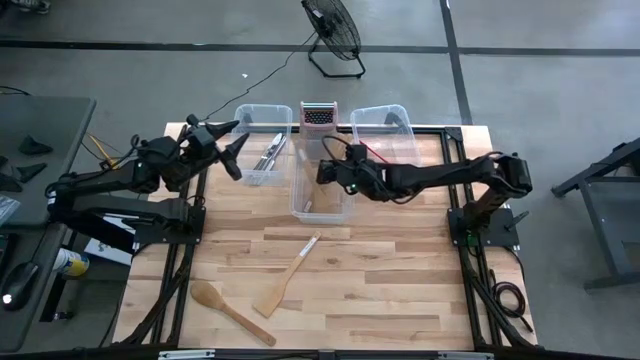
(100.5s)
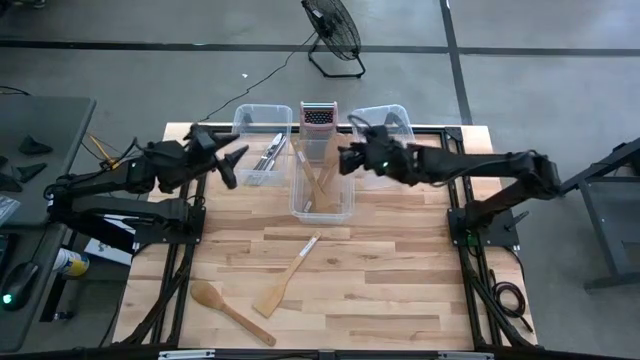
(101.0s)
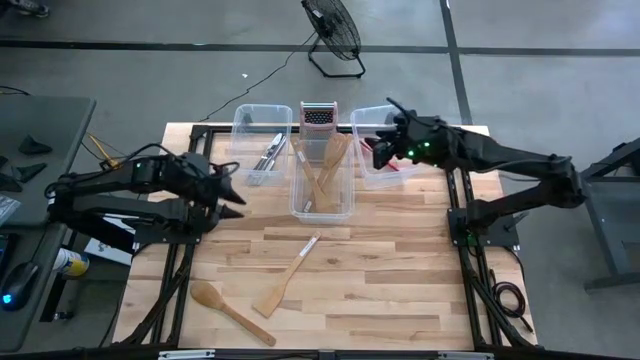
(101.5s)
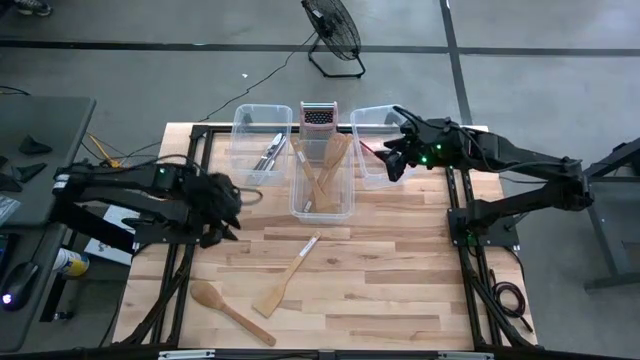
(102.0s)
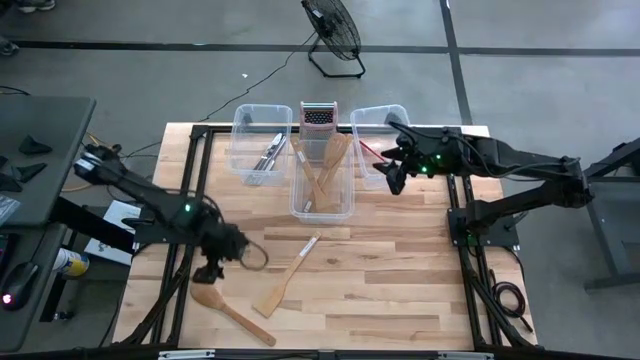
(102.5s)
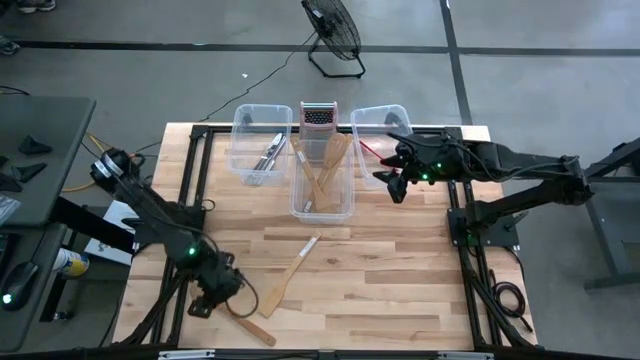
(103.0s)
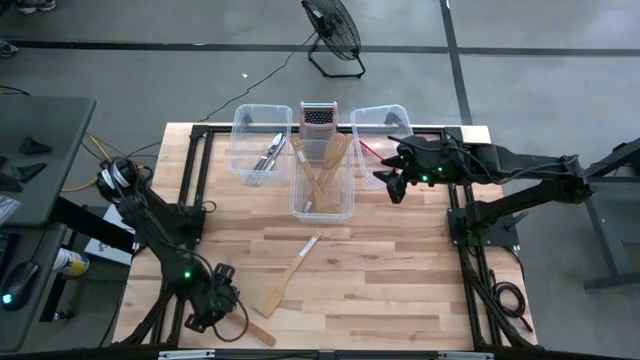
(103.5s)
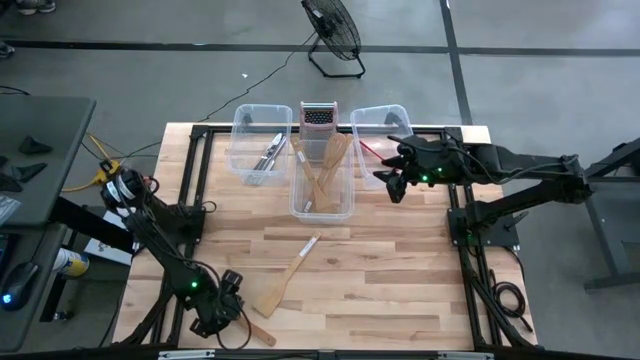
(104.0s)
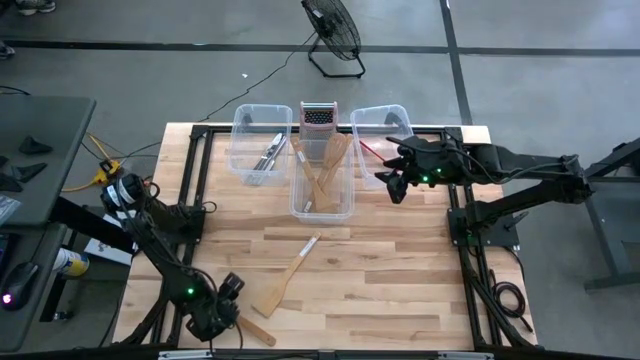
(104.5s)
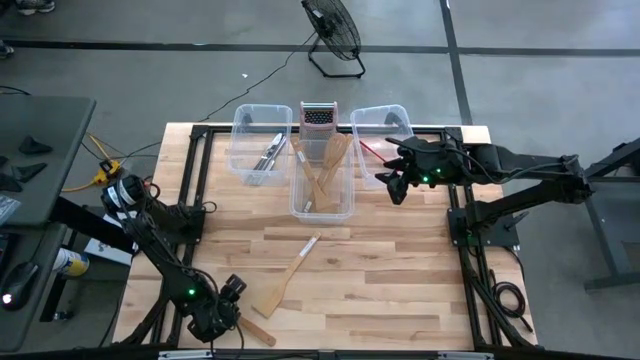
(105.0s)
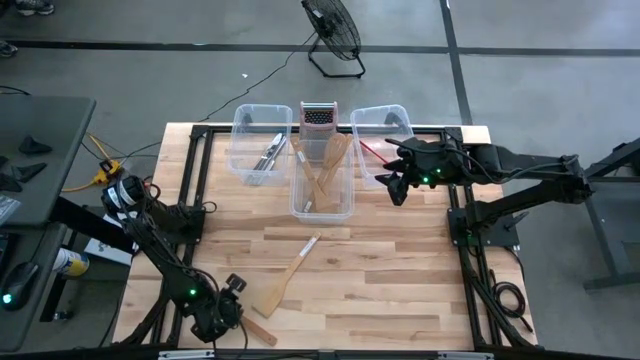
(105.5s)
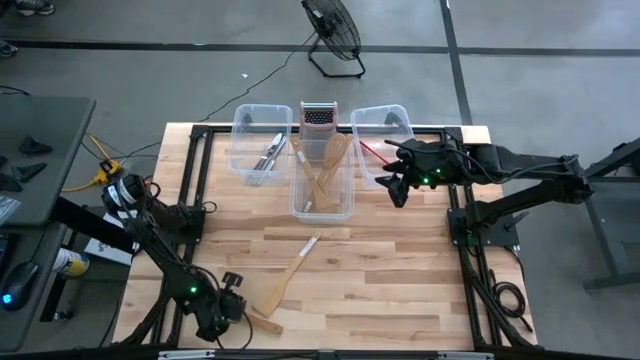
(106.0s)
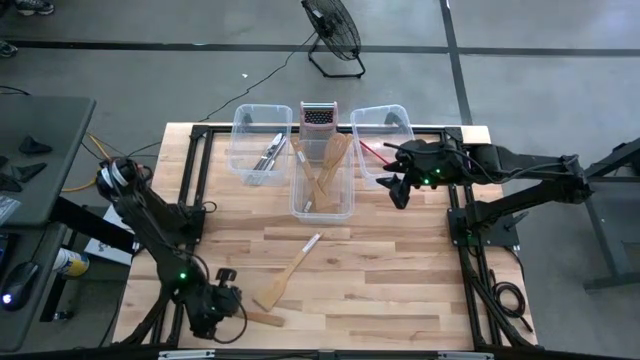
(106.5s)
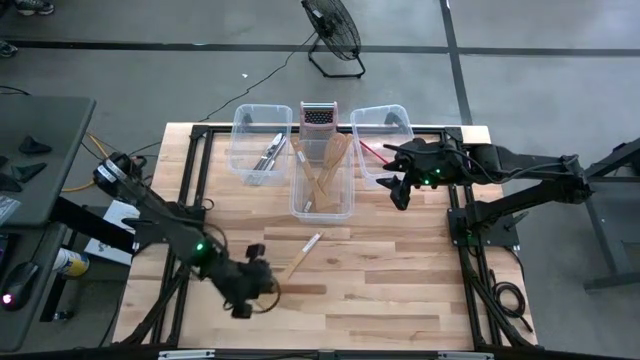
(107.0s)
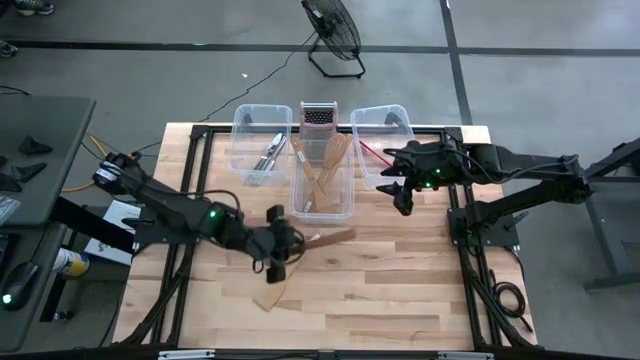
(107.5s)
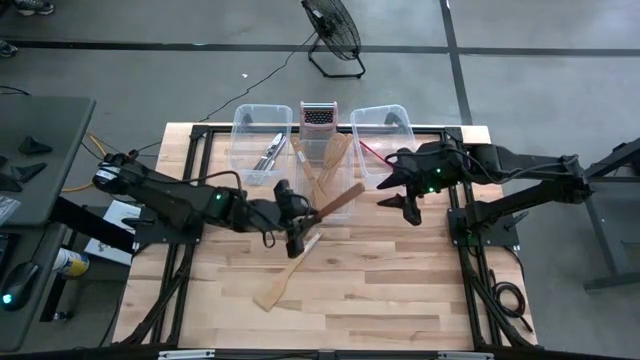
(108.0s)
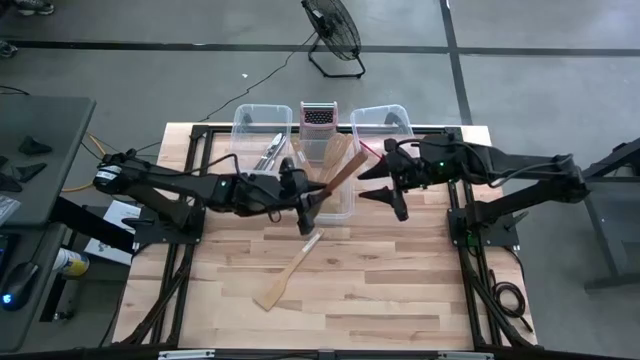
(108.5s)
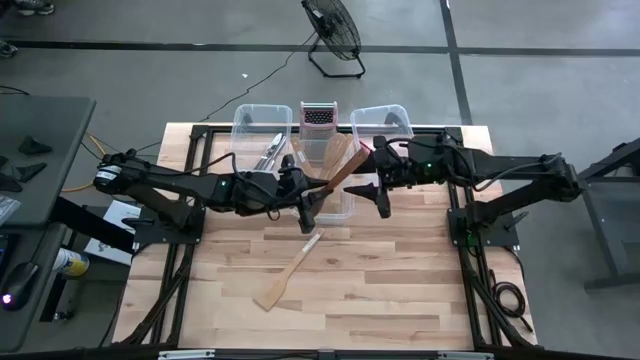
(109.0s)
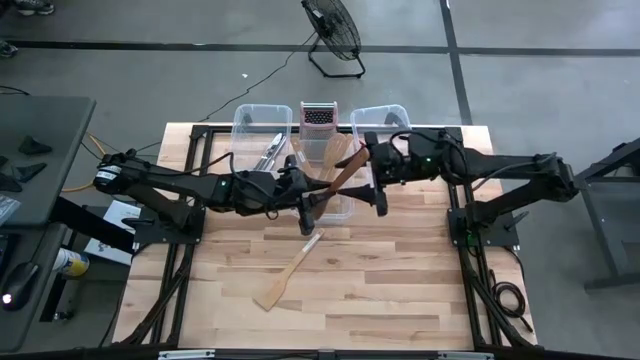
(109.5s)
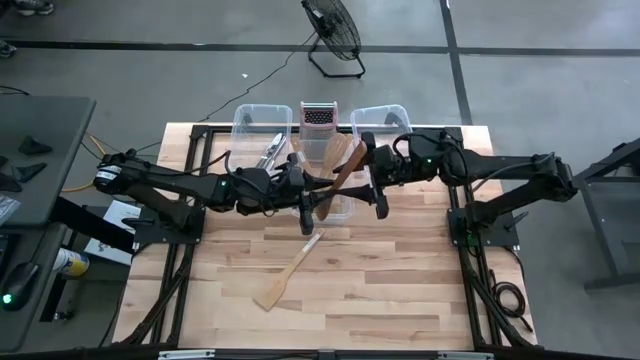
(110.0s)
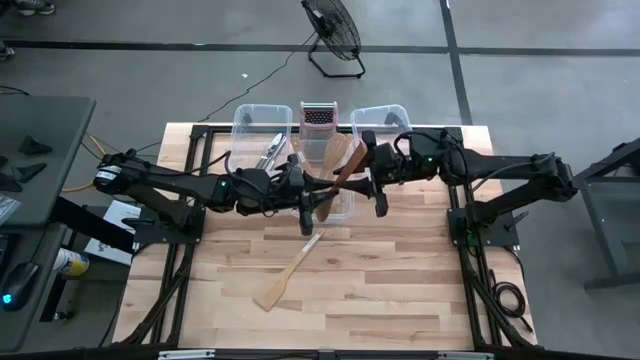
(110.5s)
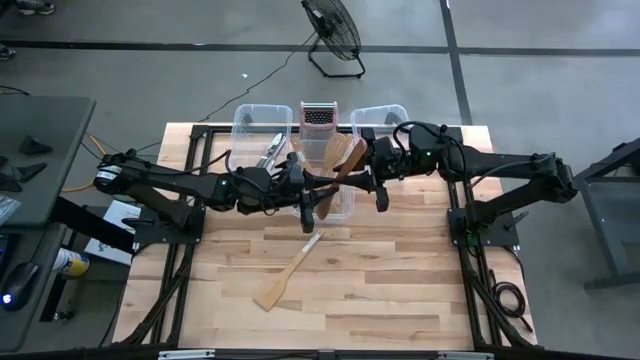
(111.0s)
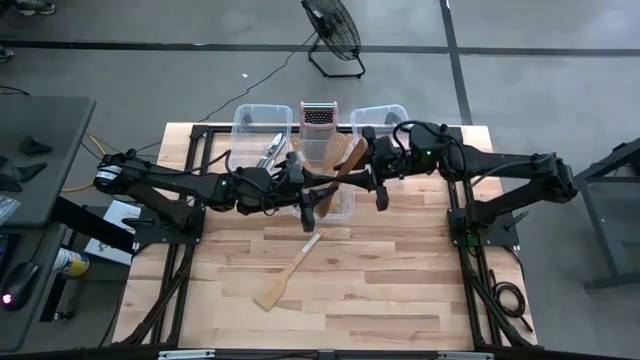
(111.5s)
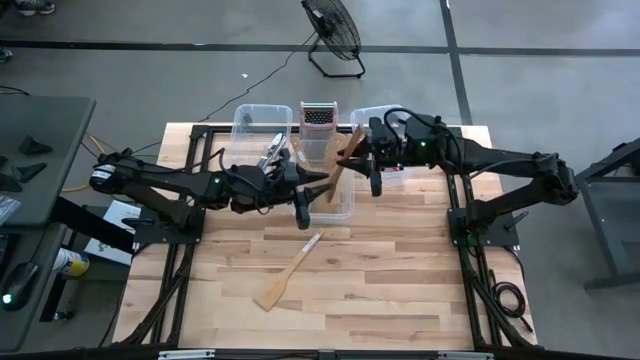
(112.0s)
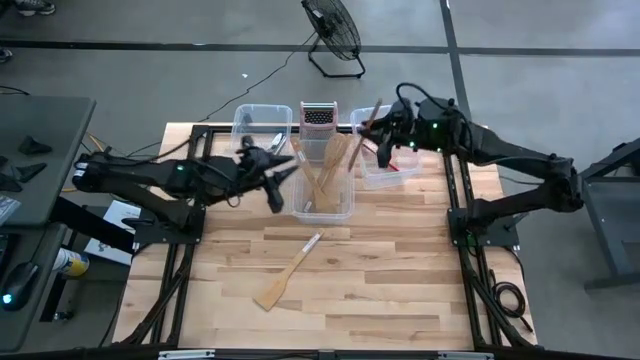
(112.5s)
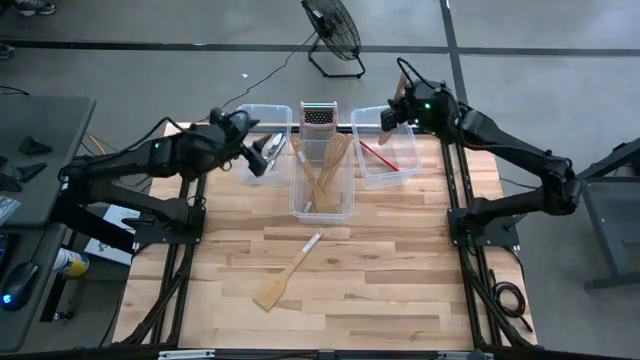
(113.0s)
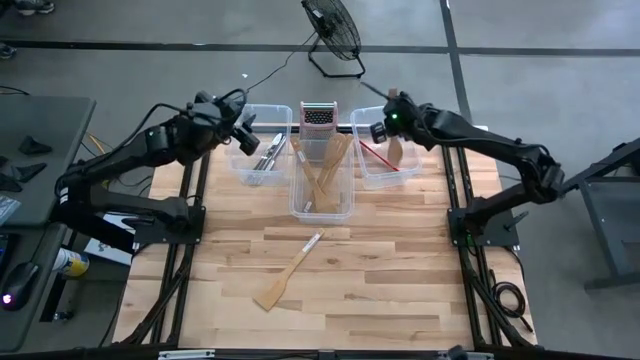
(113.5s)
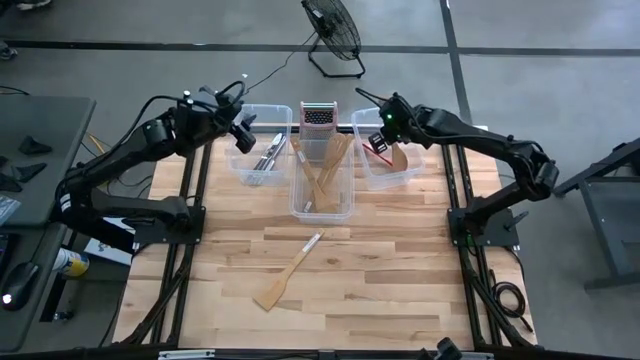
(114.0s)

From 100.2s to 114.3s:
Task: Pick & Place Kitchen Items
Put the brown serving spoon into the right transparent bin

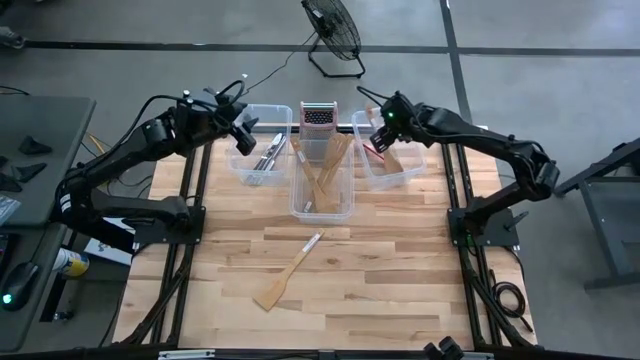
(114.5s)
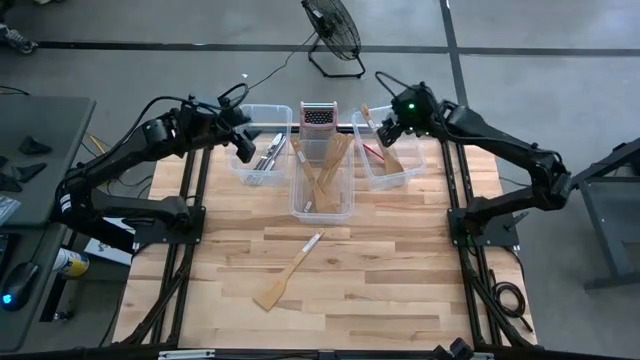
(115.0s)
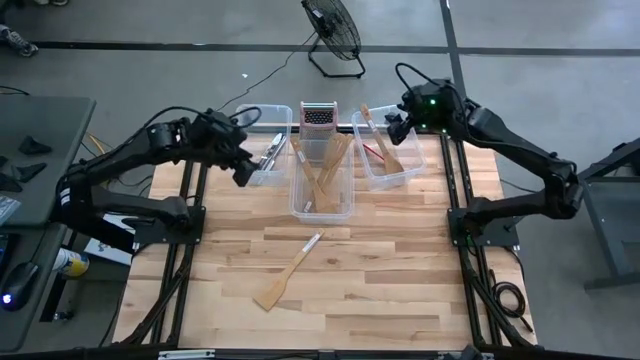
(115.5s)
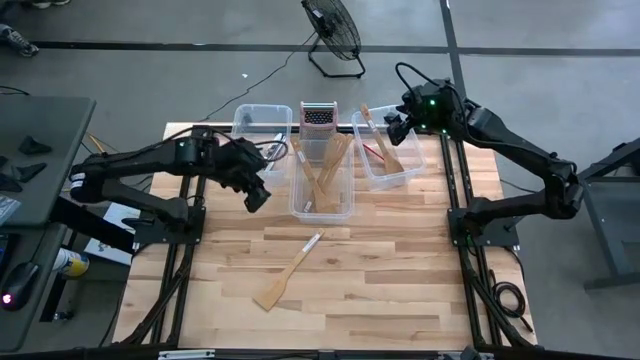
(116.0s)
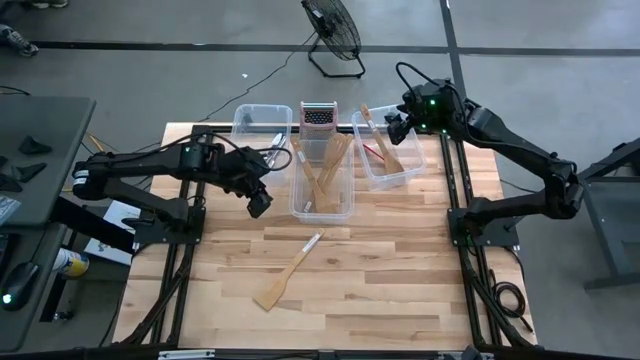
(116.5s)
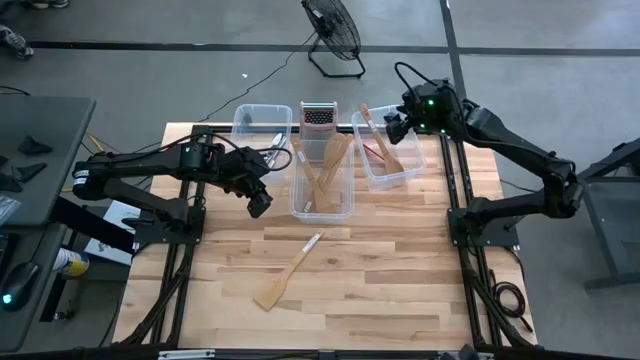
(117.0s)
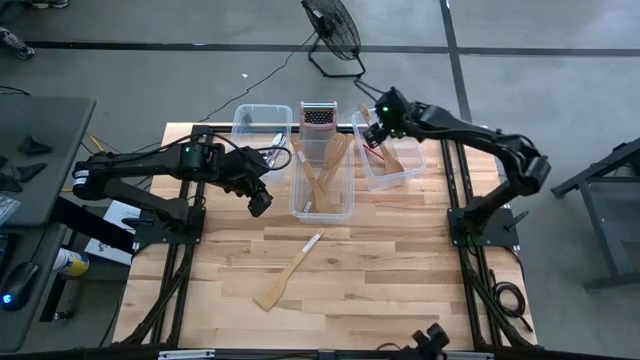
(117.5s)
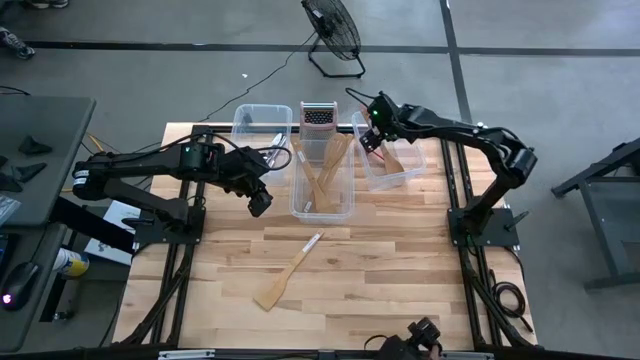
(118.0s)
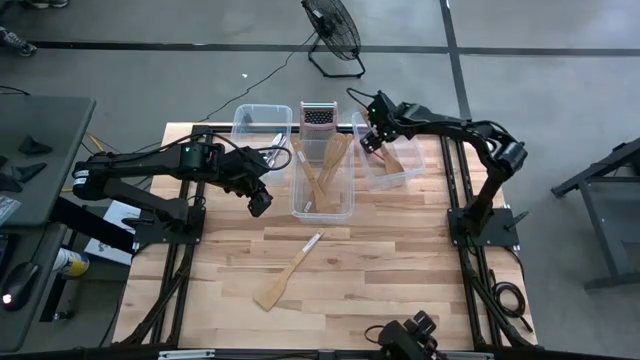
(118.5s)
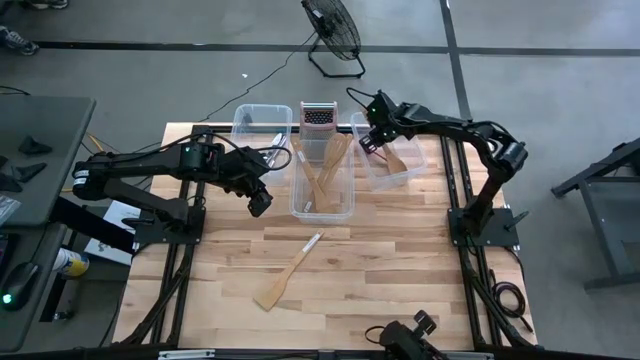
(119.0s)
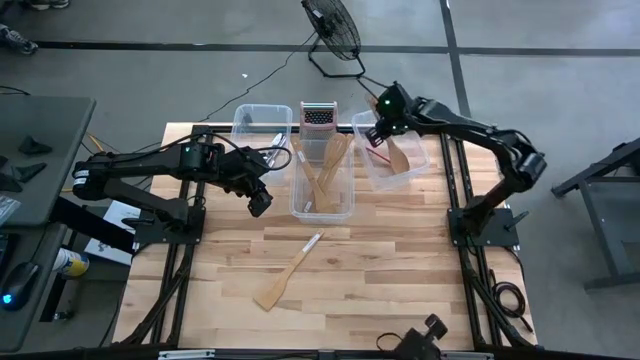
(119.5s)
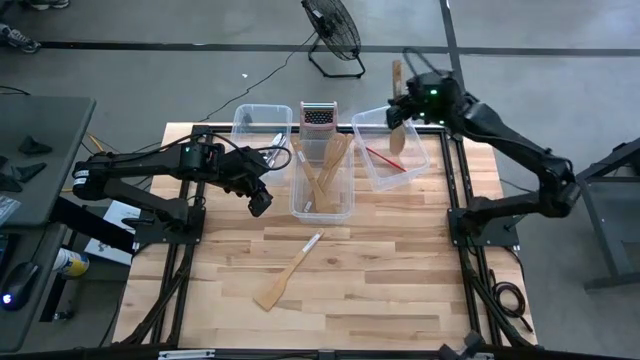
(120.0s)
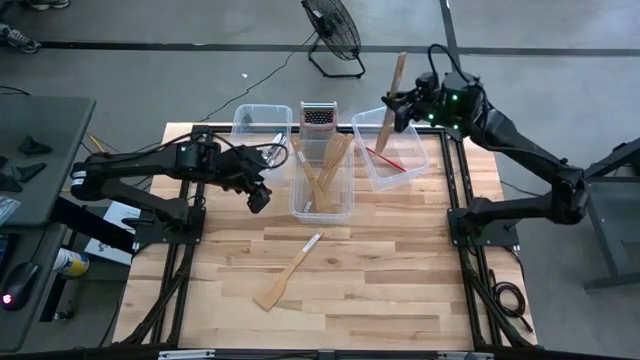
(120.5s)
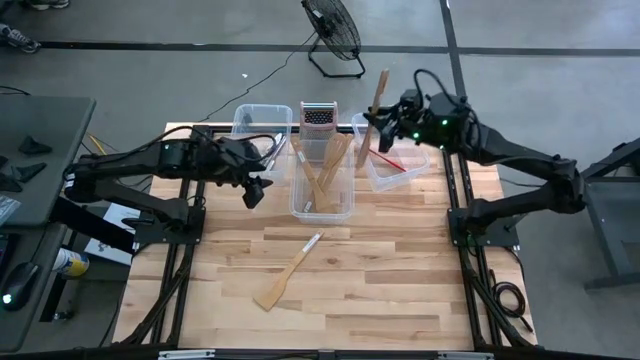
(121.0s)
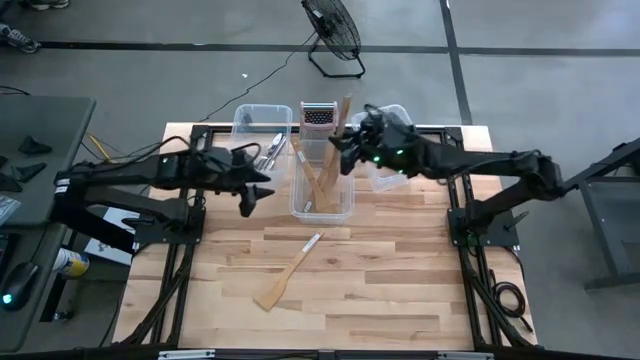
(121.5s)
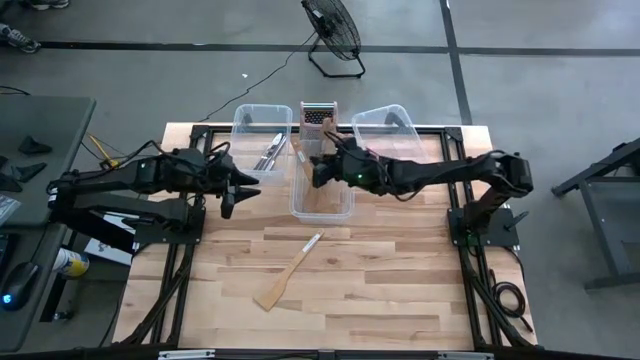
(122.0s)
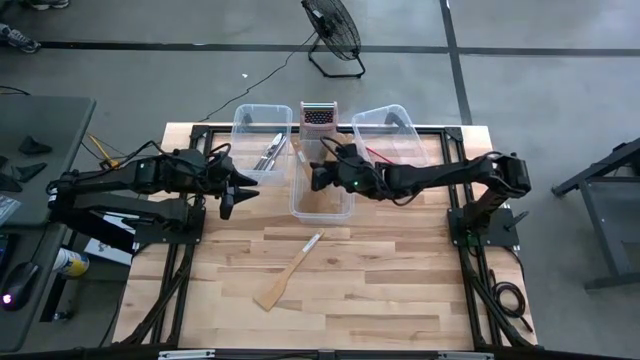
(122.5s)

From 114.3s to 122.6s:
Put the brown serving spoon into the middle transparent bin
